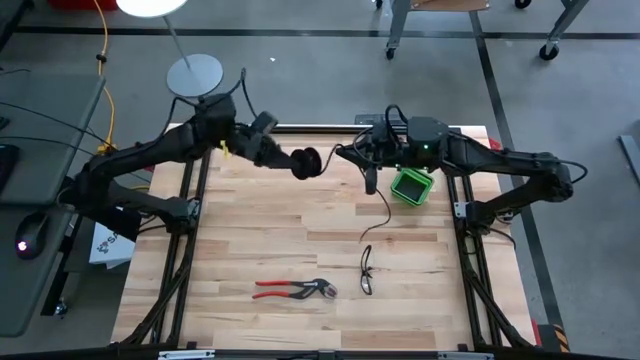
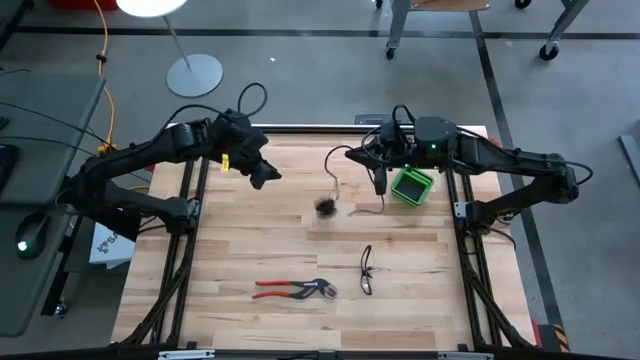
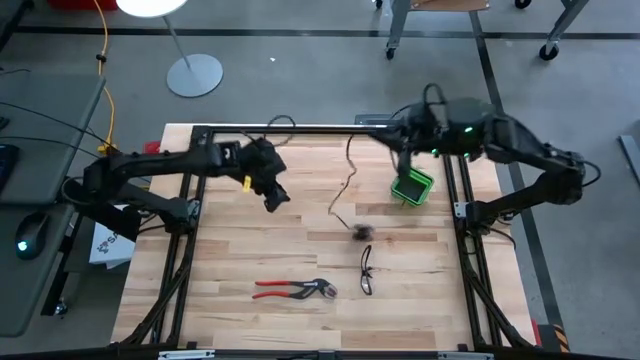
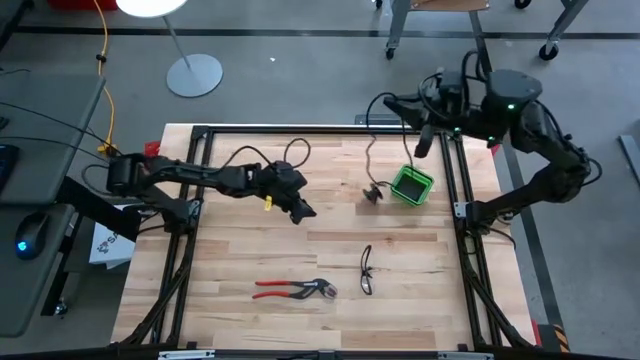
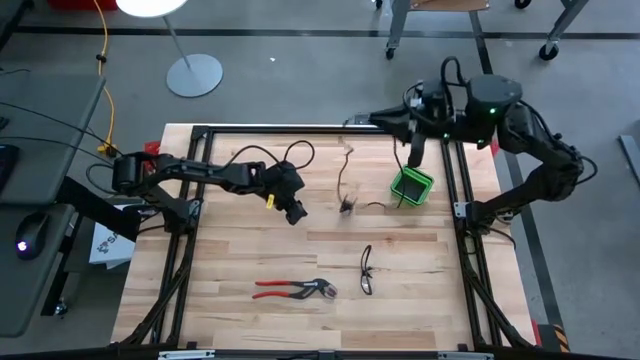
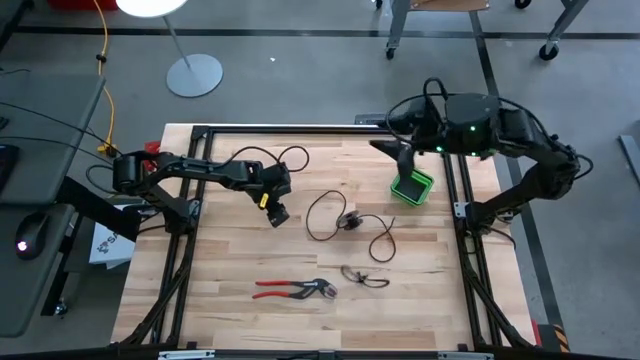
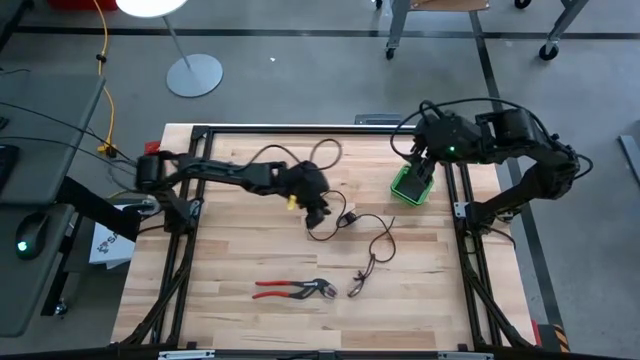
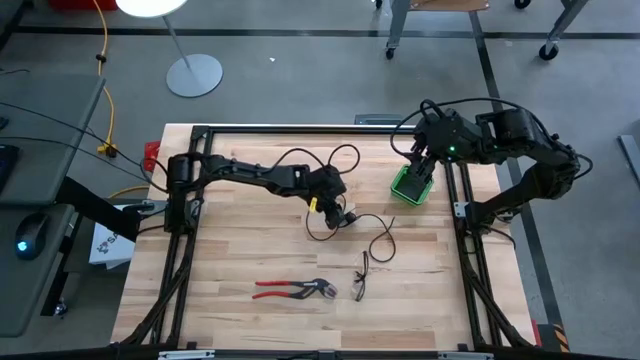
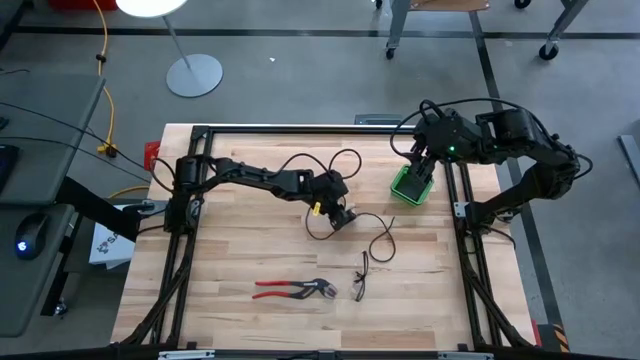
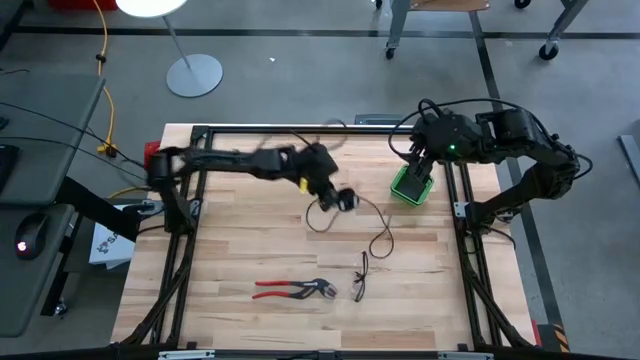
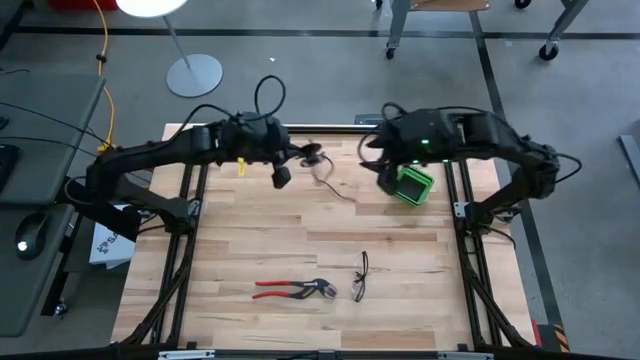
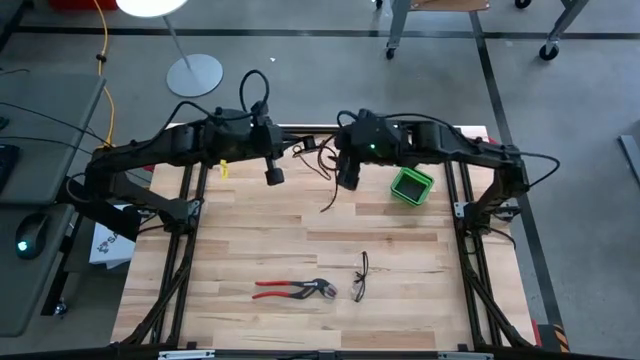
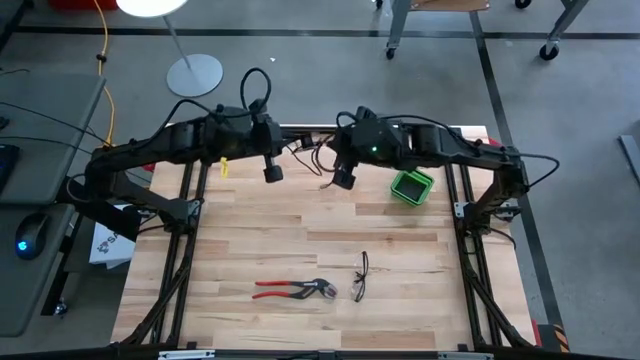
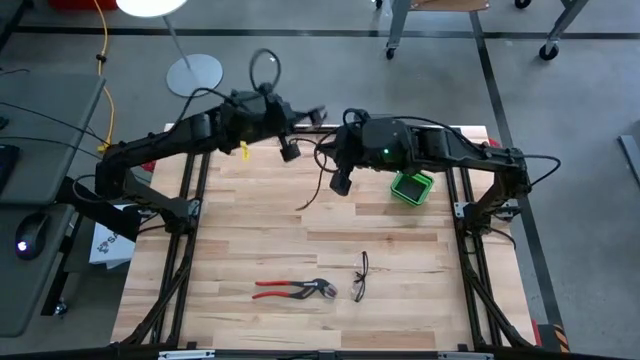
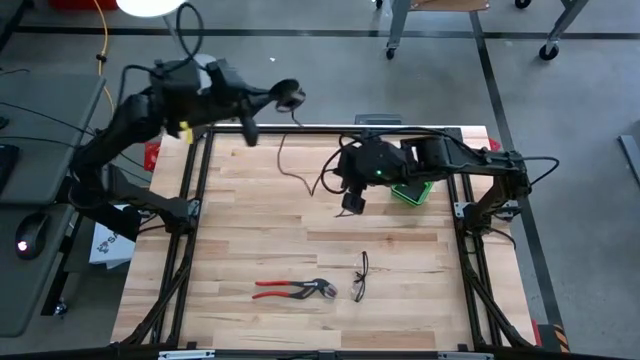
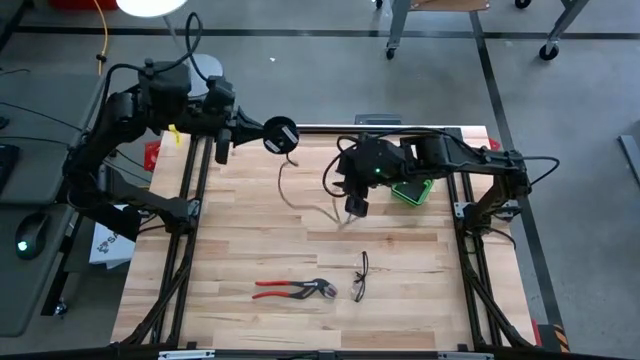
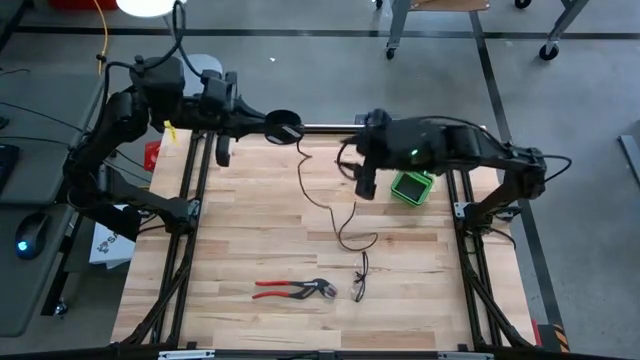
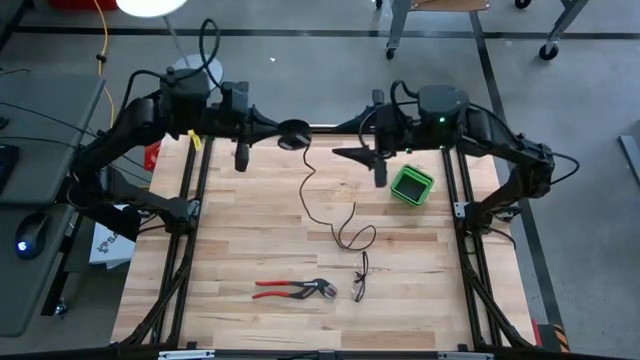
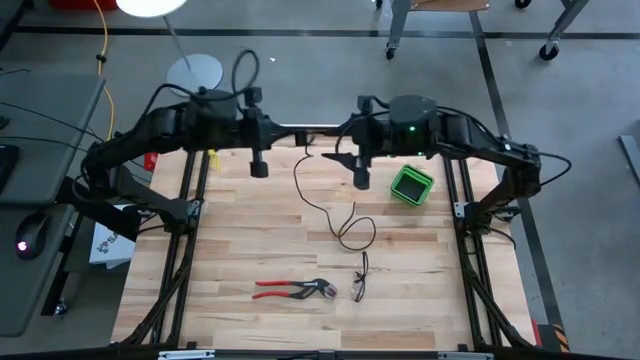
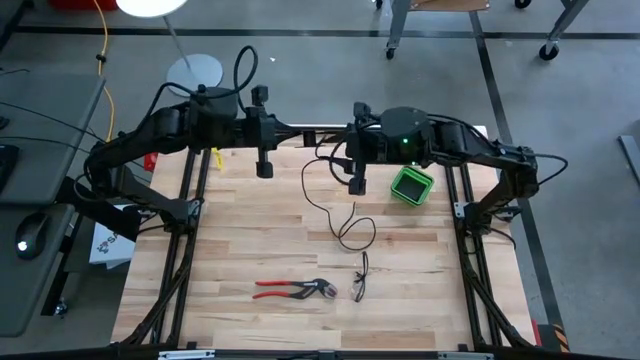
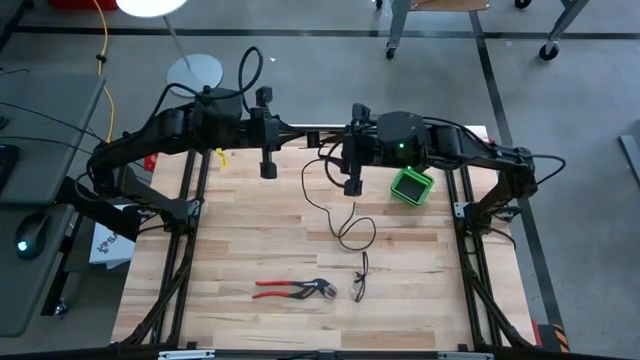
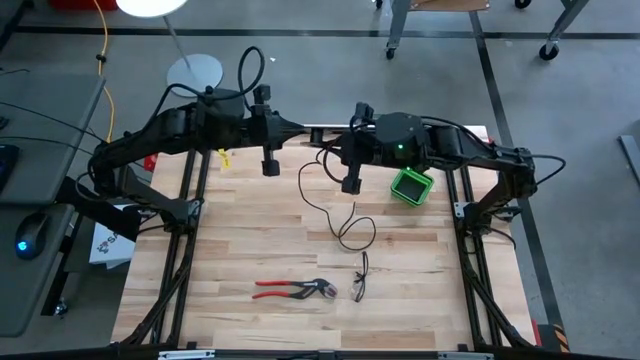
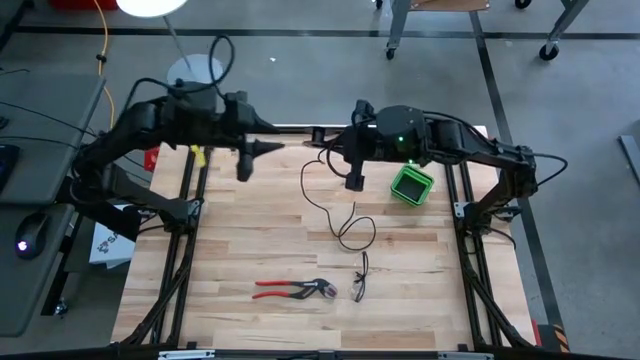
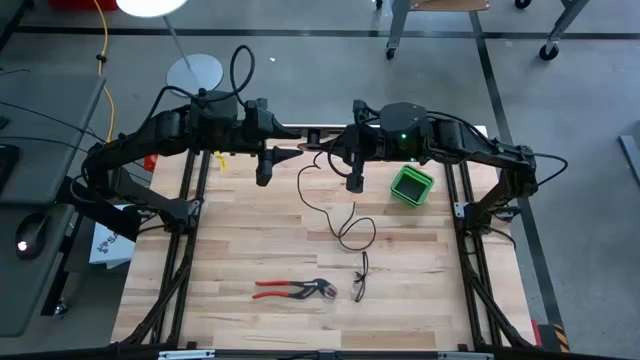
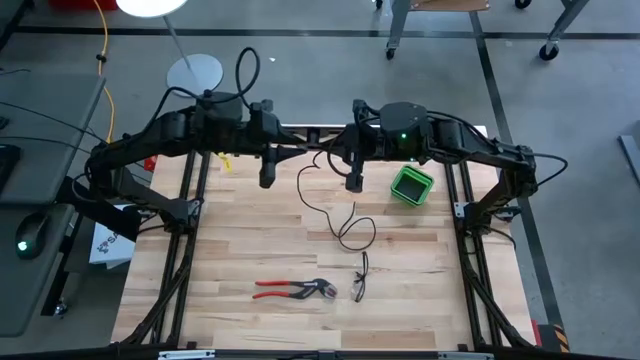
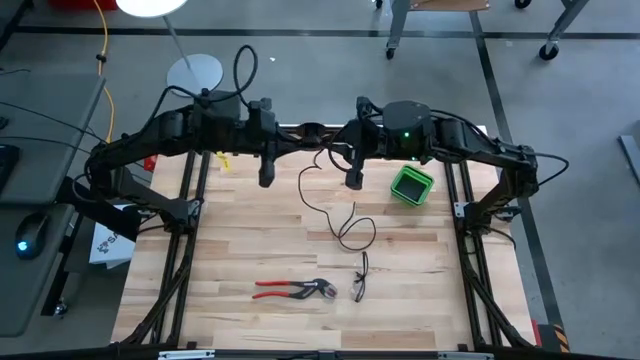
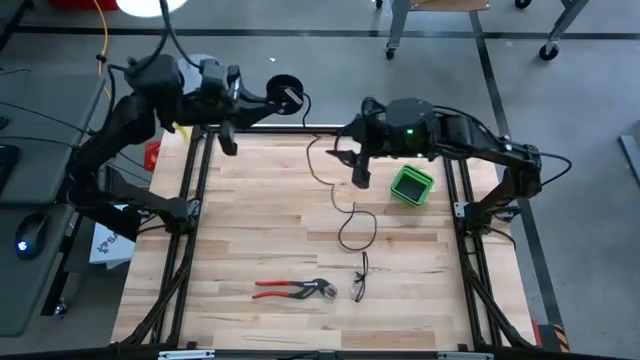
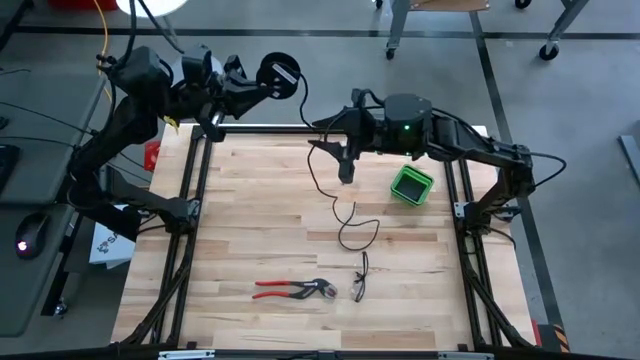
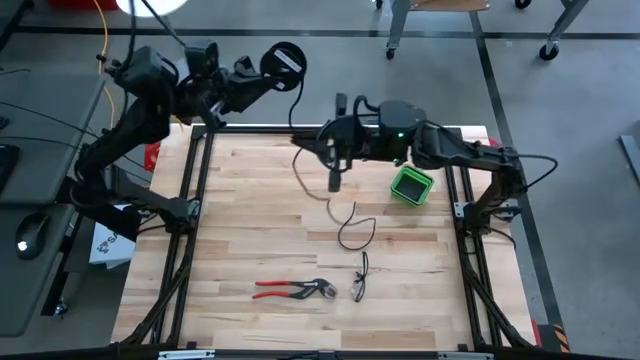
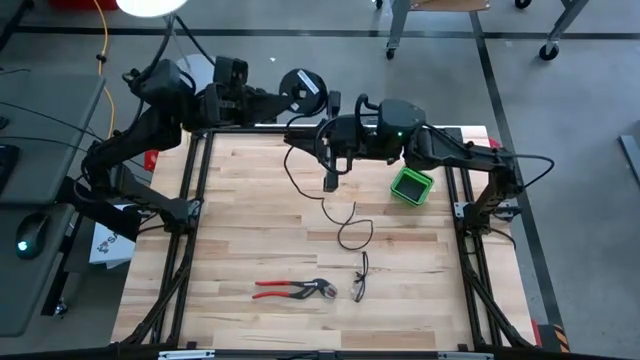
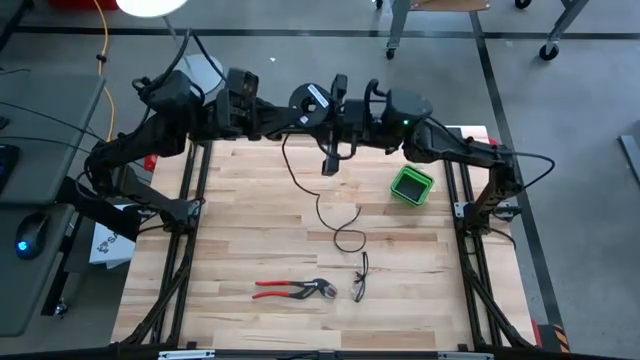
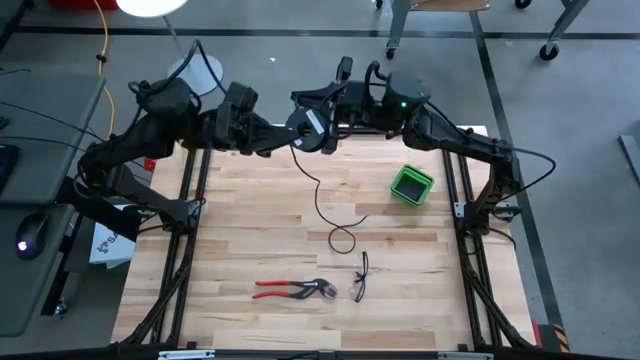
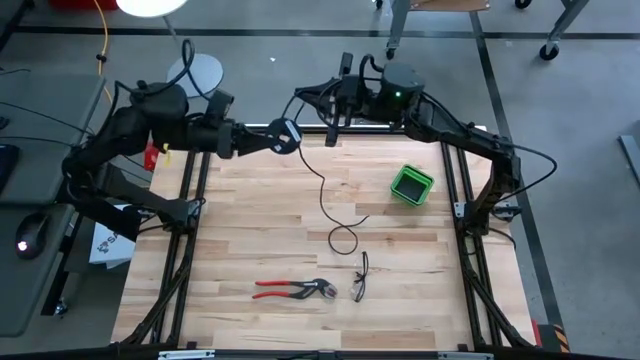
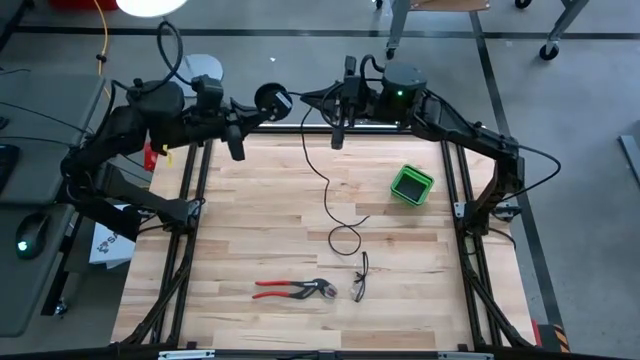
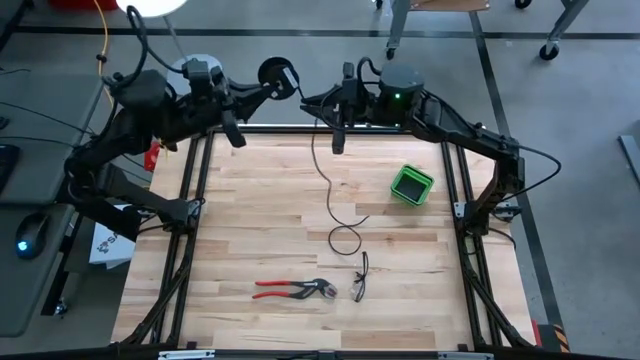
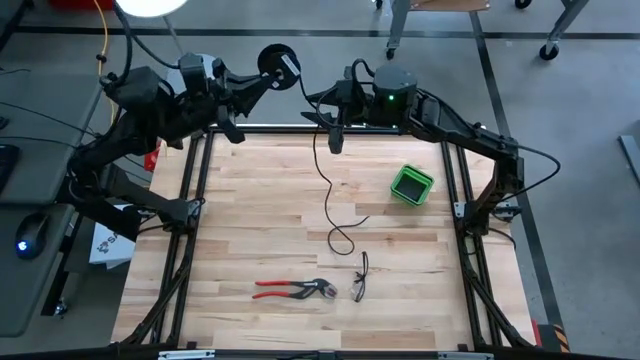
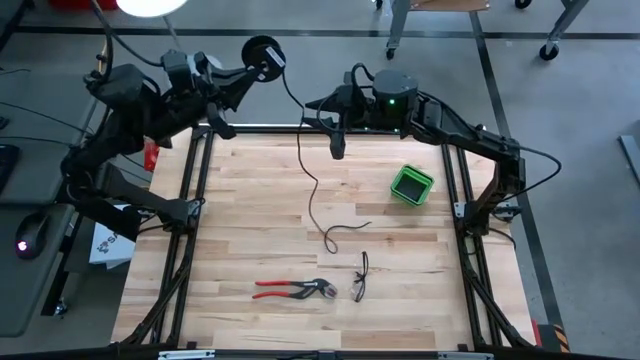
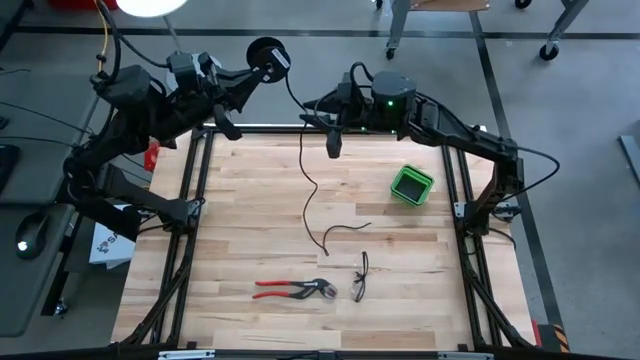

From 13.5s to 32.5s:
Task: Coil cords
Coil the black wire on the black spool
